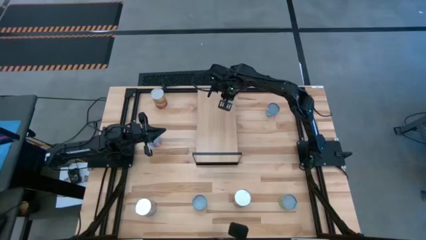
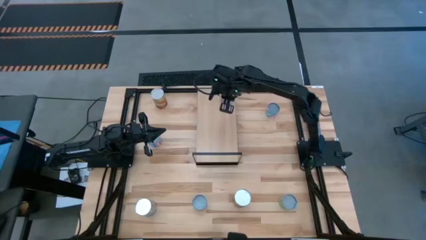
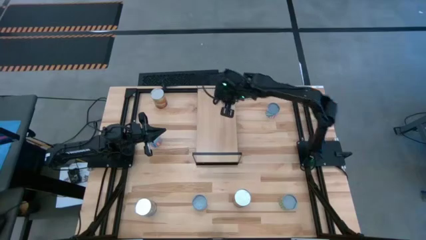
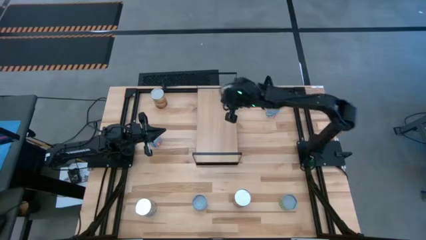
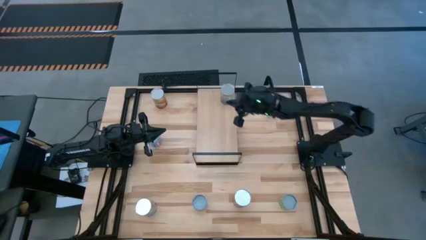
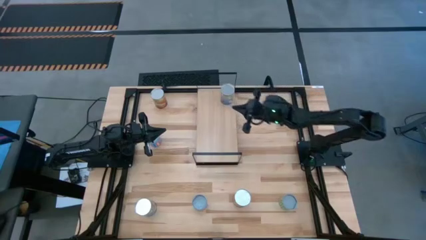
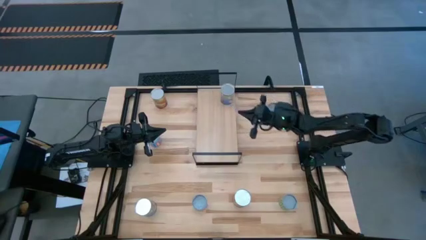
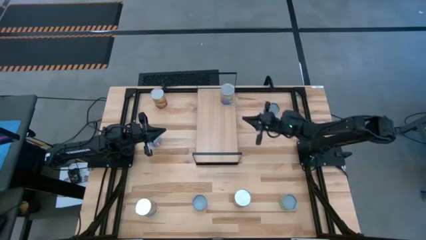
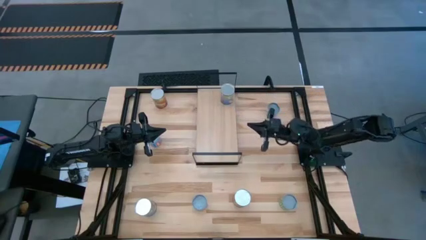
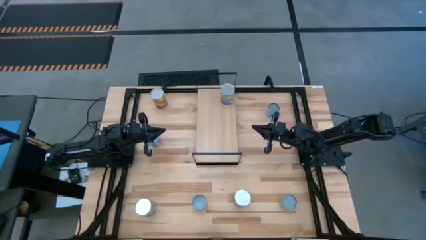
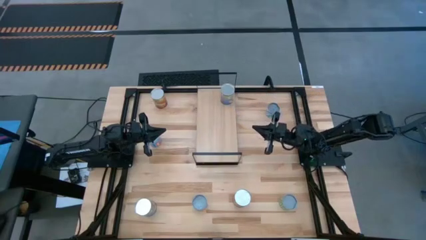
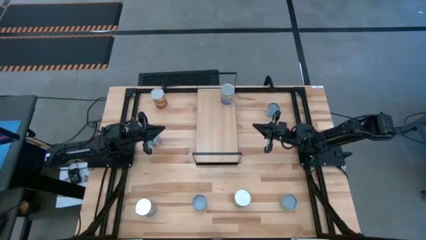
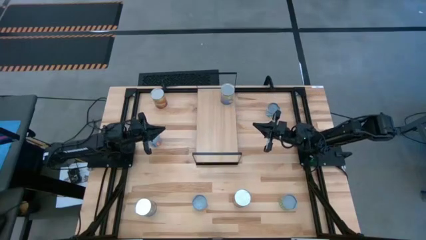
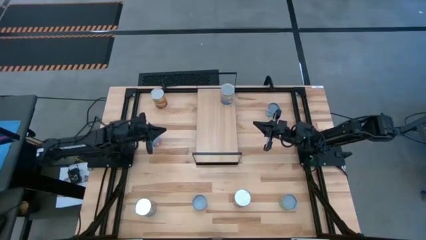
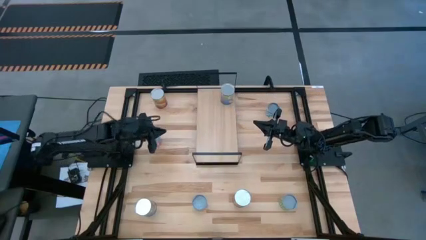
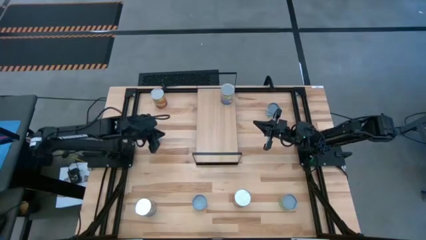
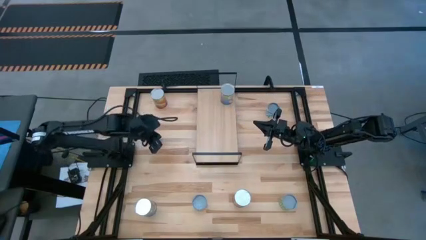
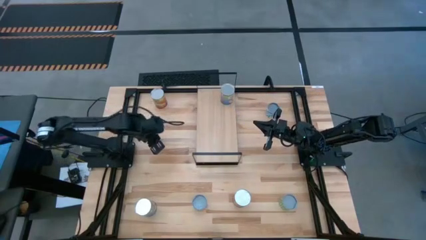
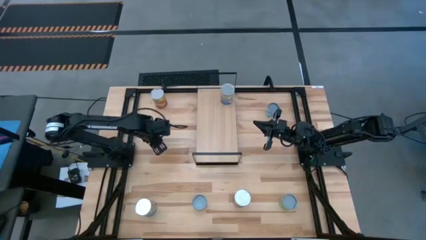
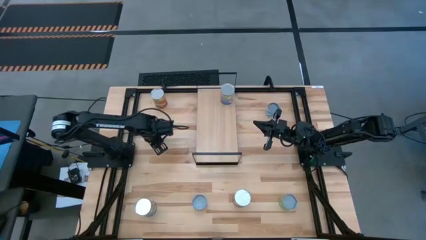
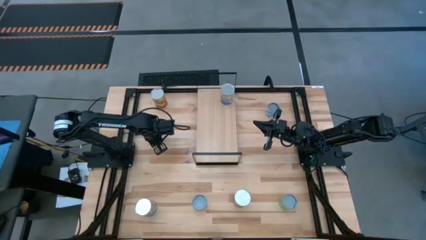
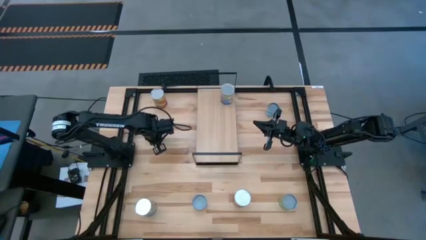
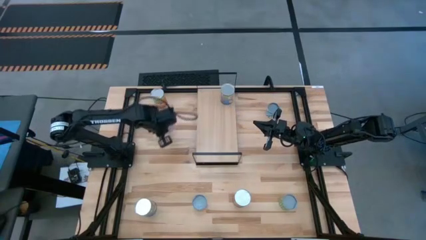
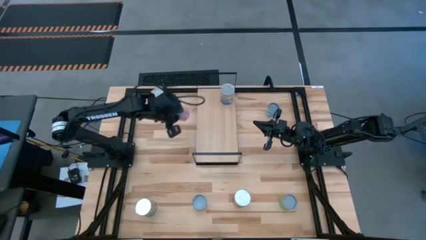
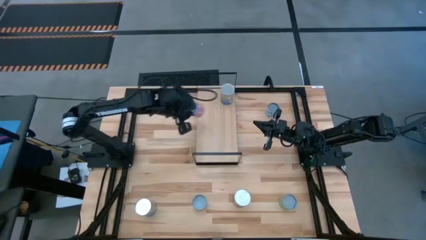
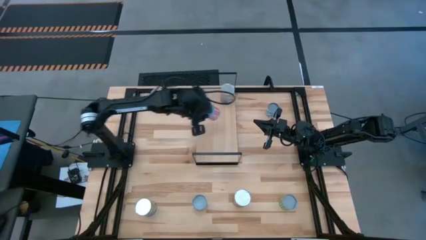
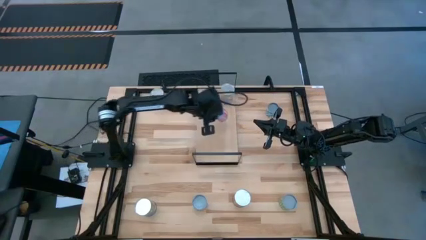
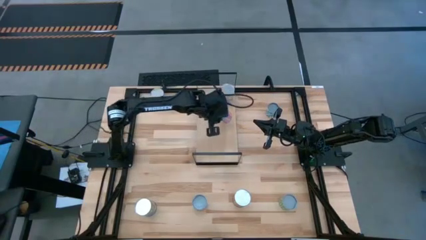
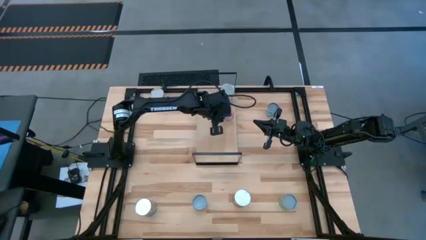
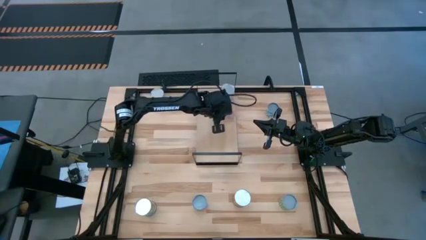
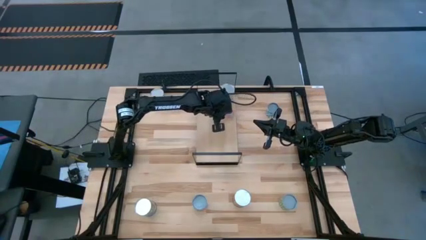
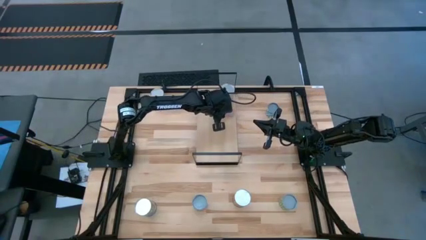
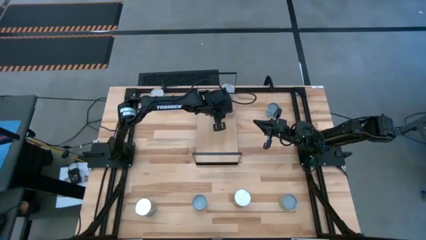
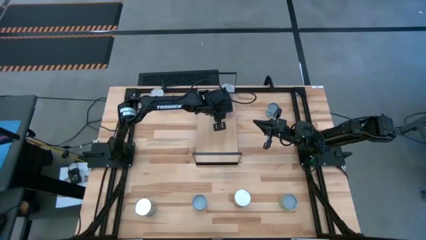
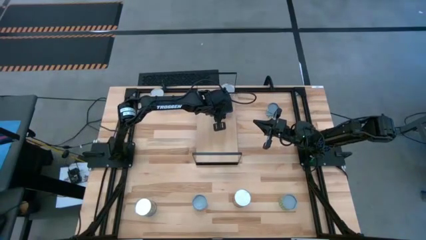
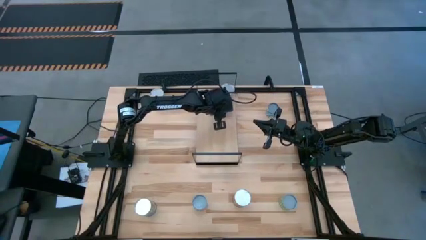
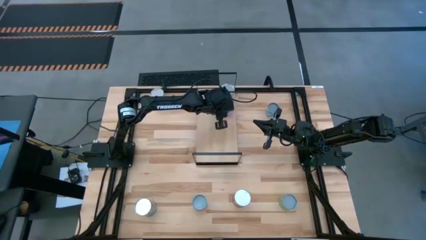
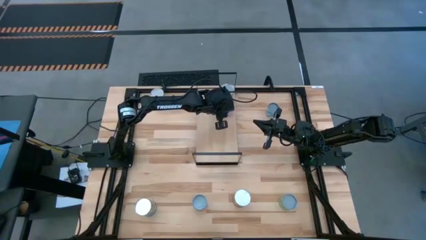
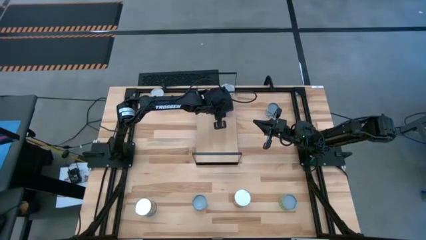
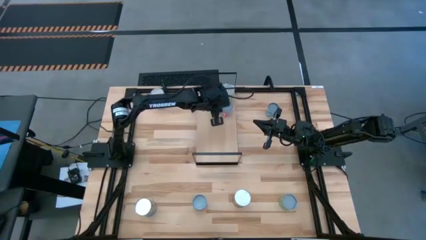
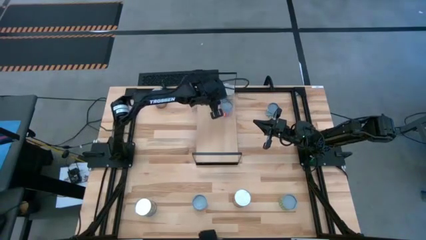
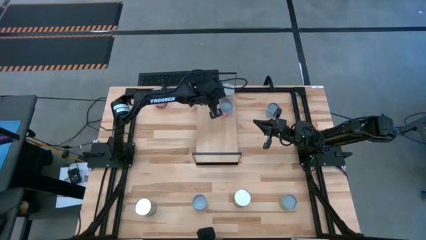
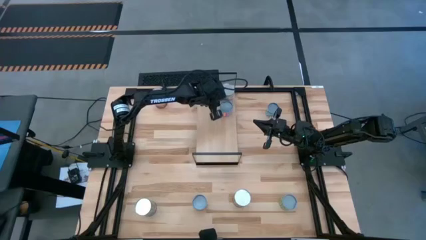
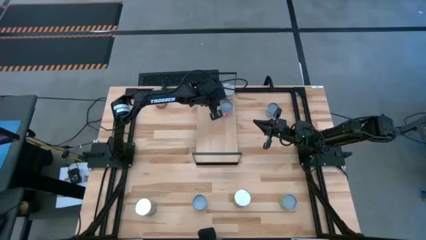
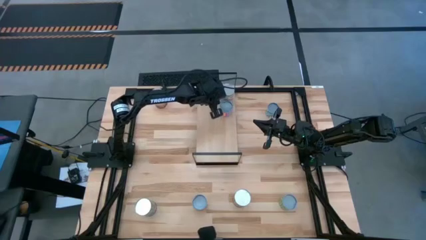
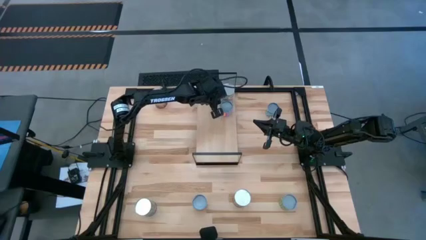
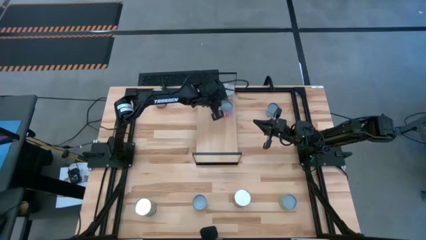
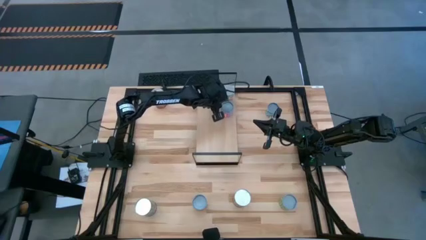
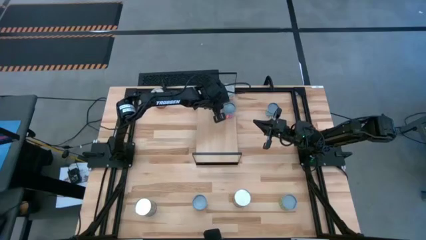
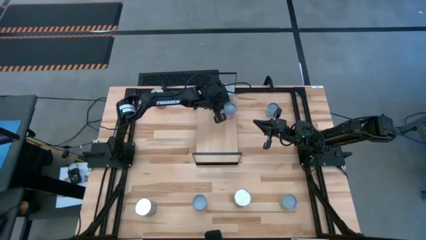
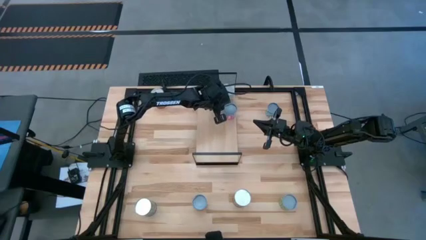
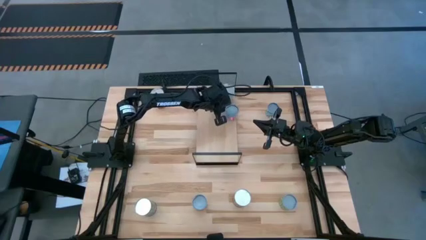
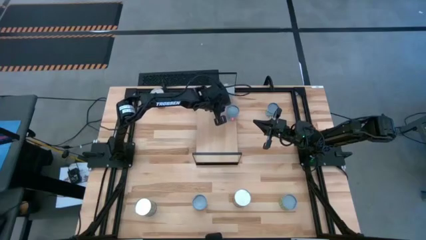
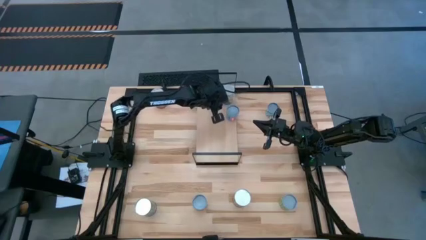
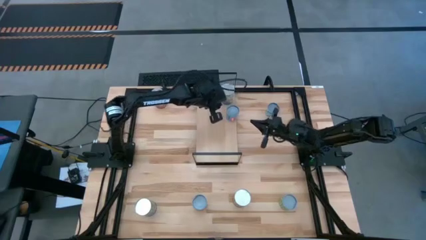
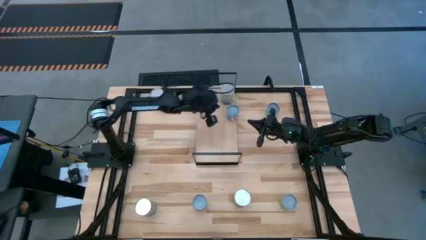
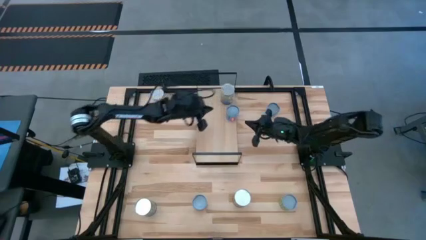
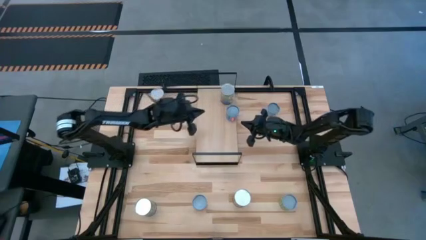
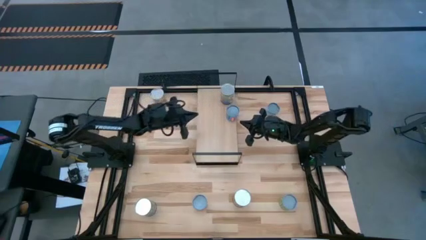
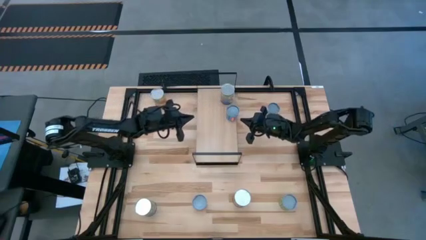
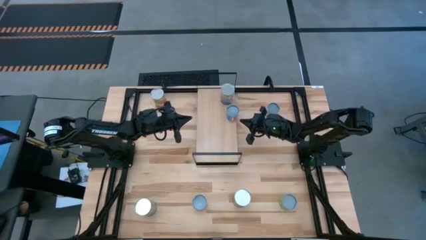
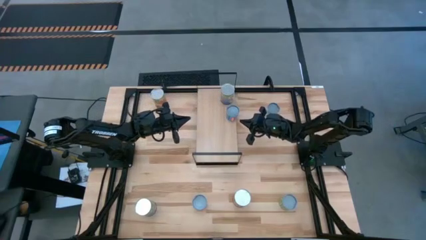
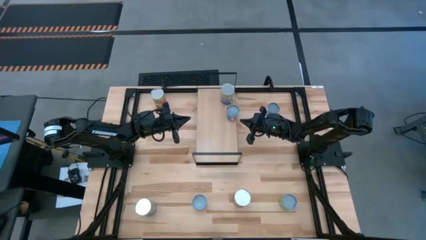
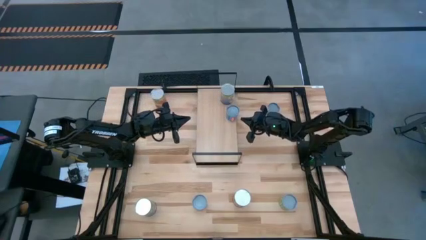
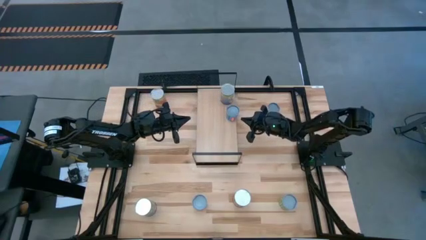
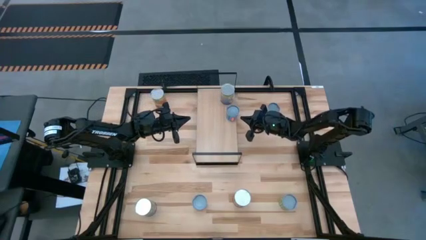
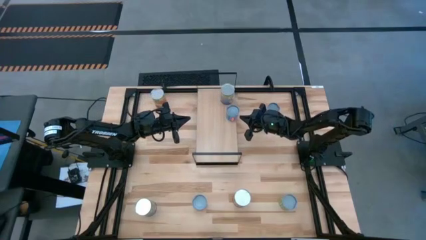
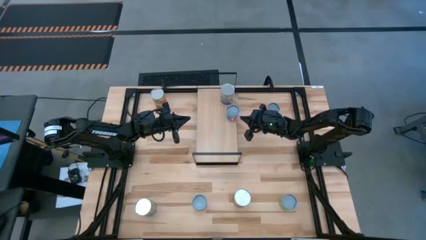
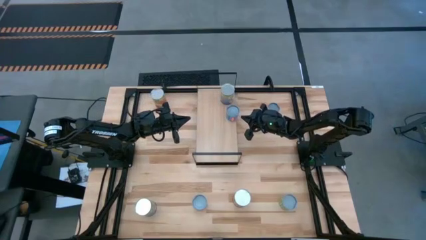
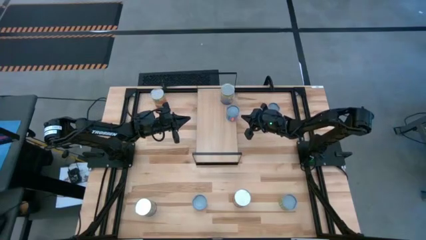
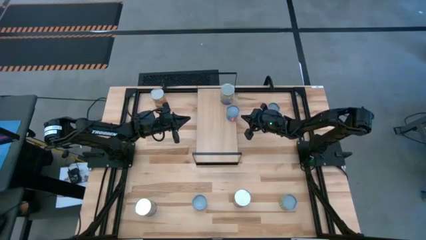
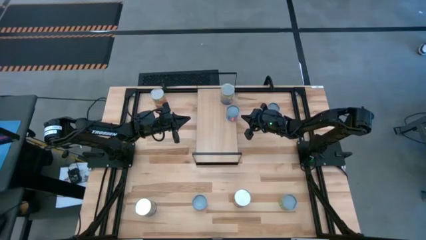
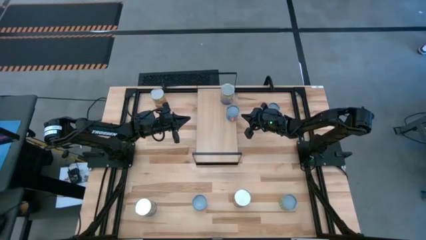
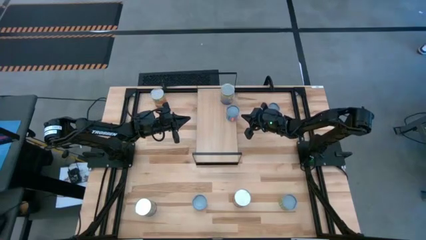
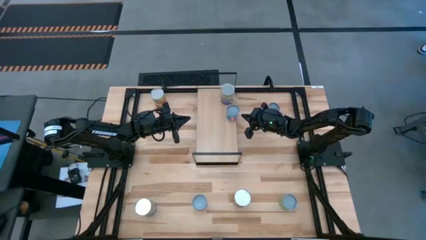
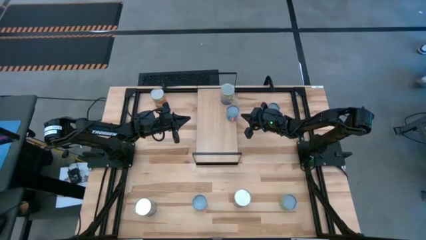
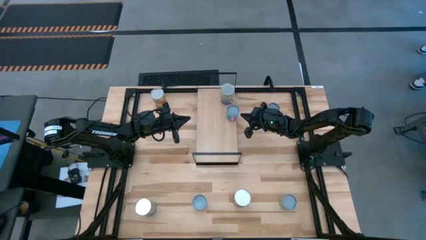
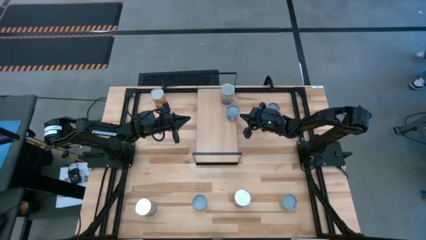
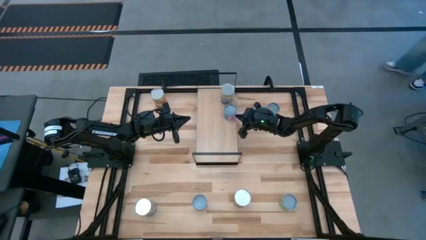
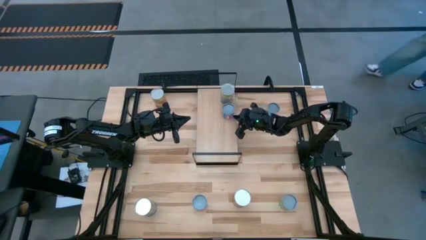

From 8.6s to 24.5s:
Task: Pick and place cans onto a shelf
Put the small canned corn on the shelf
